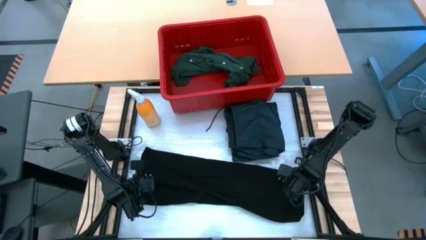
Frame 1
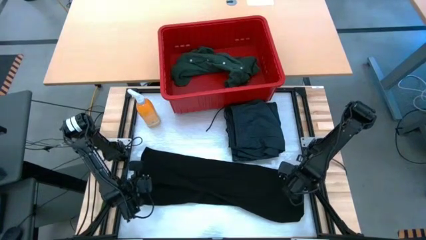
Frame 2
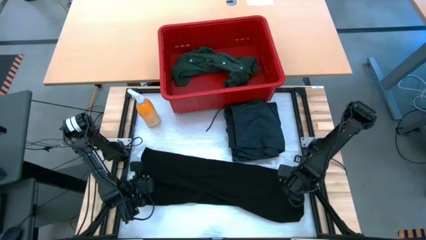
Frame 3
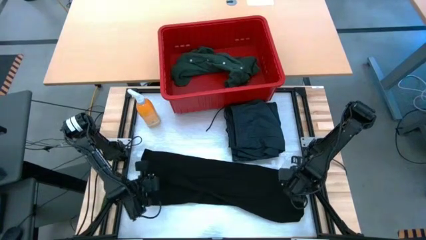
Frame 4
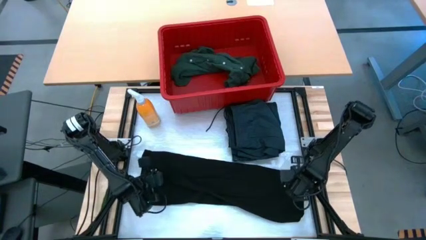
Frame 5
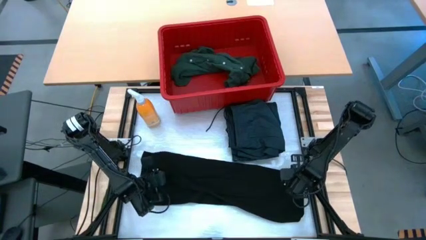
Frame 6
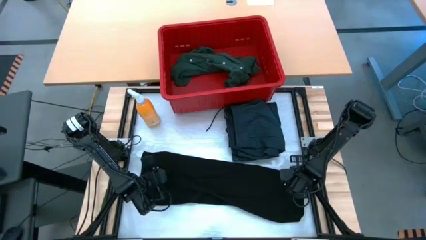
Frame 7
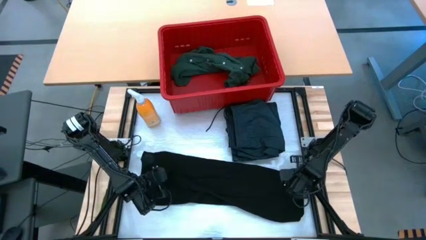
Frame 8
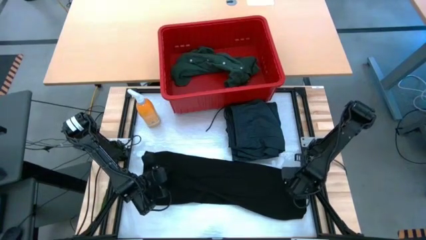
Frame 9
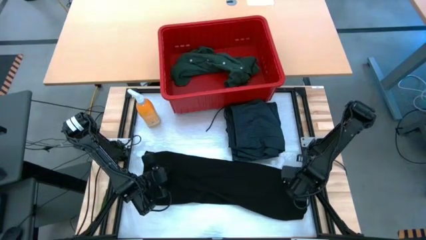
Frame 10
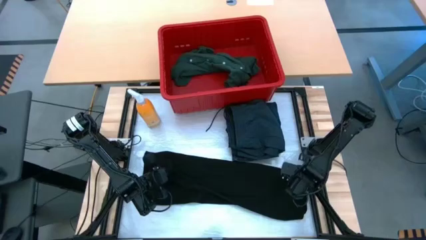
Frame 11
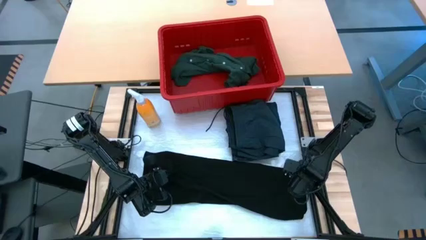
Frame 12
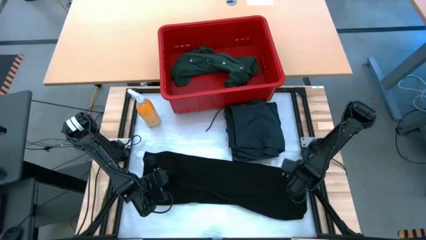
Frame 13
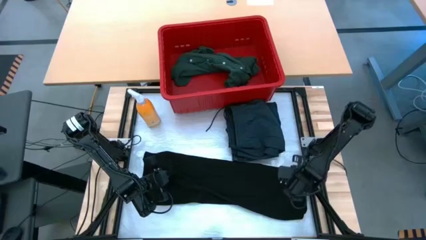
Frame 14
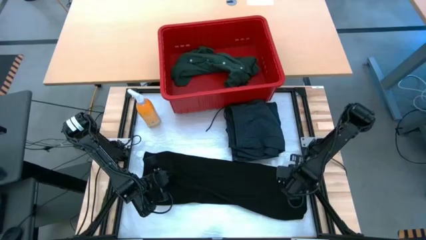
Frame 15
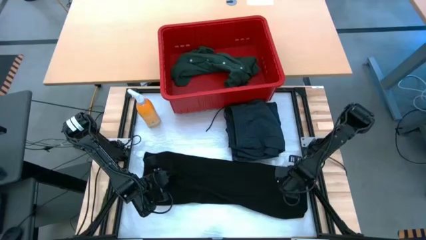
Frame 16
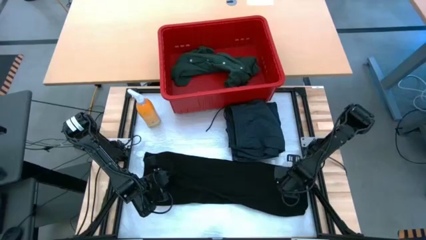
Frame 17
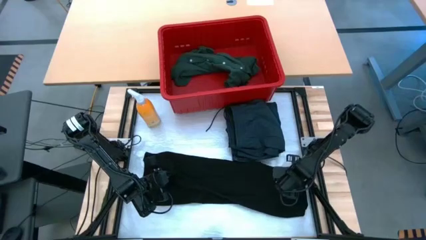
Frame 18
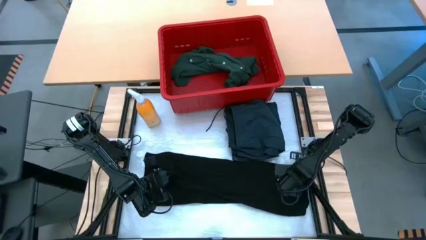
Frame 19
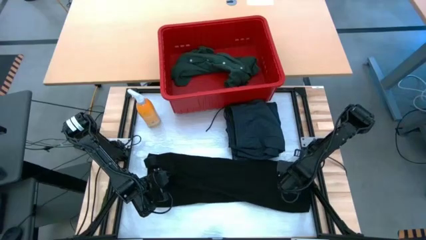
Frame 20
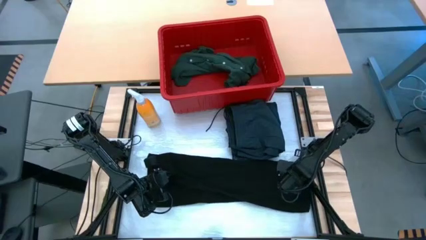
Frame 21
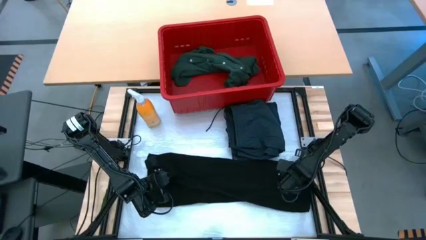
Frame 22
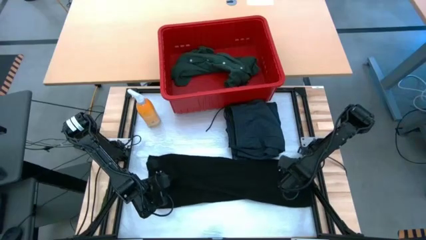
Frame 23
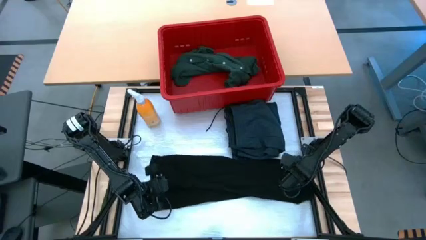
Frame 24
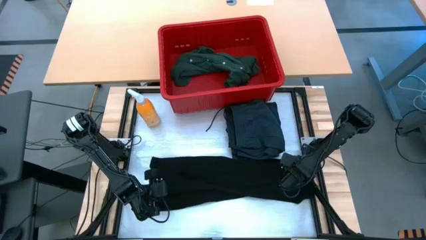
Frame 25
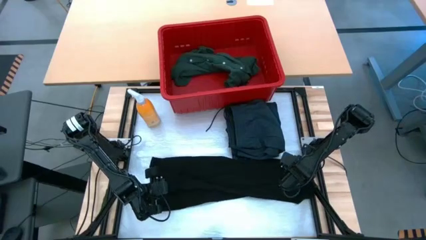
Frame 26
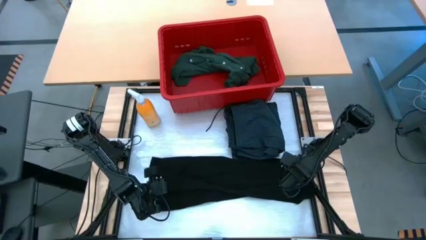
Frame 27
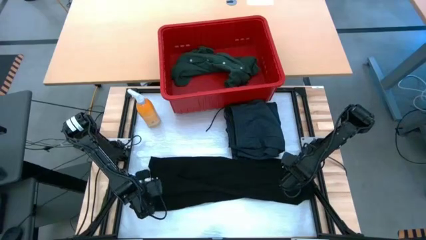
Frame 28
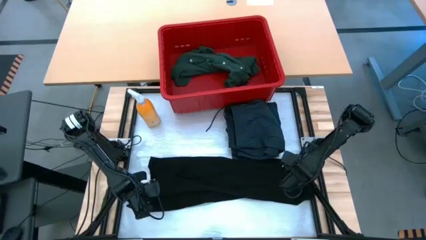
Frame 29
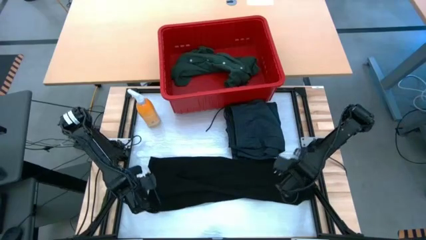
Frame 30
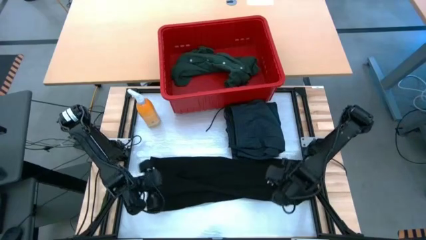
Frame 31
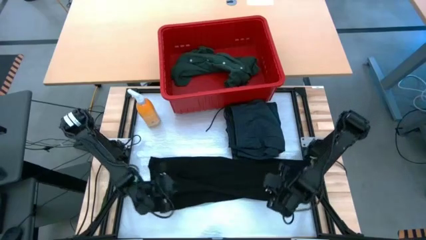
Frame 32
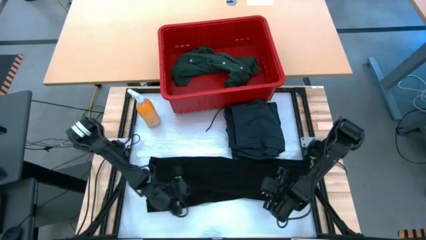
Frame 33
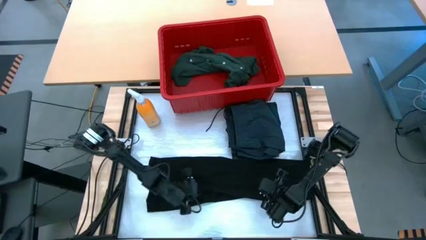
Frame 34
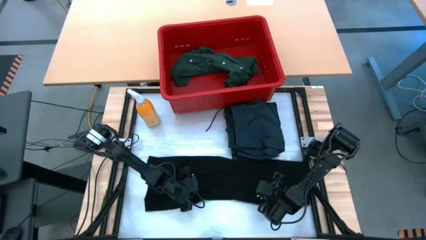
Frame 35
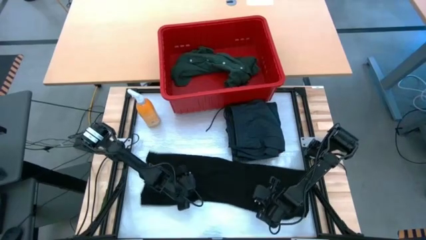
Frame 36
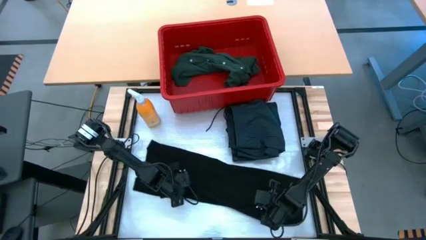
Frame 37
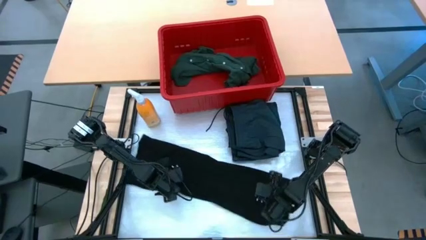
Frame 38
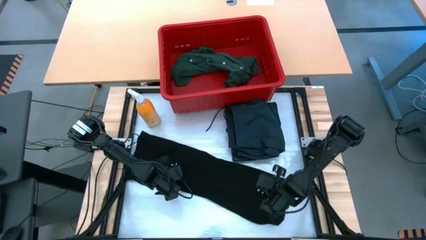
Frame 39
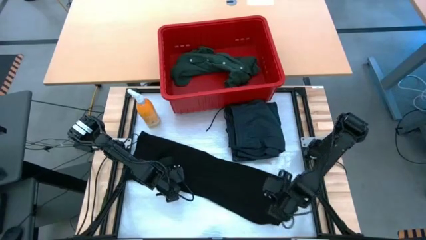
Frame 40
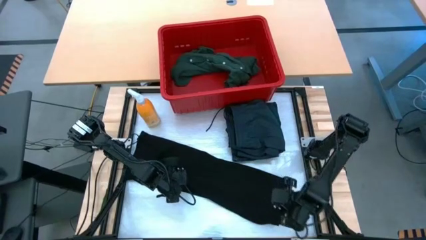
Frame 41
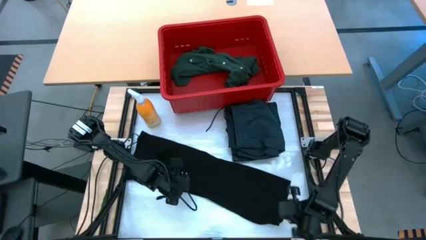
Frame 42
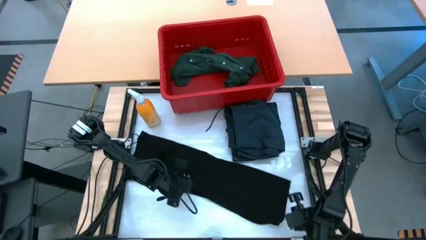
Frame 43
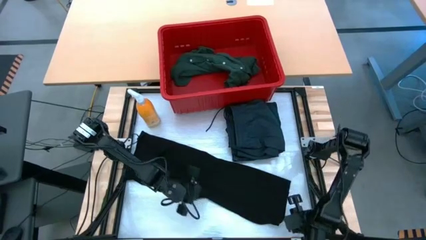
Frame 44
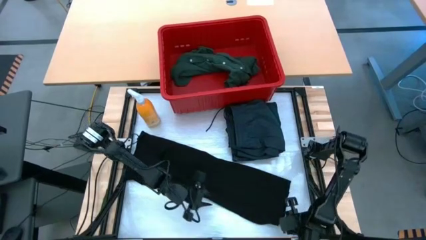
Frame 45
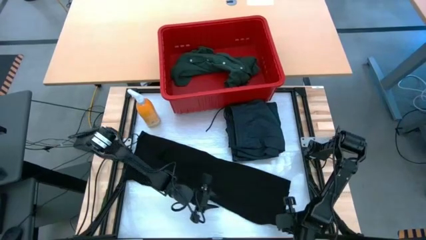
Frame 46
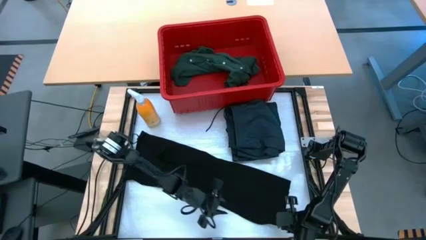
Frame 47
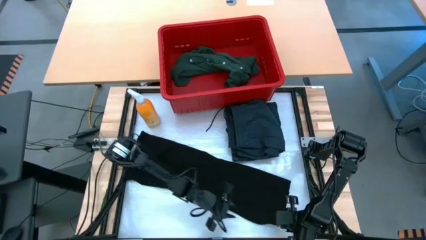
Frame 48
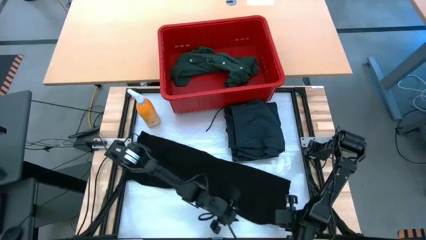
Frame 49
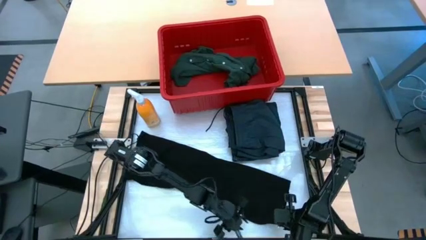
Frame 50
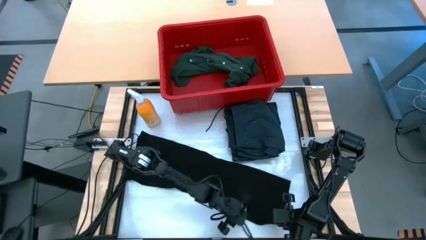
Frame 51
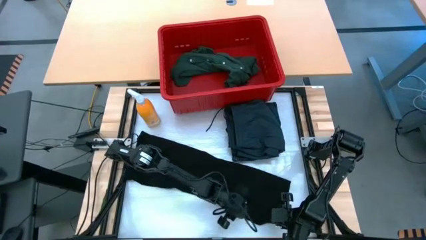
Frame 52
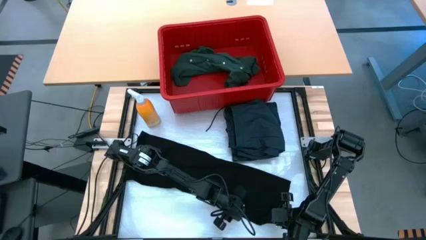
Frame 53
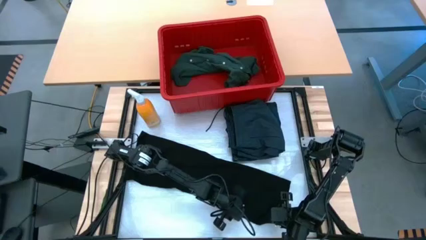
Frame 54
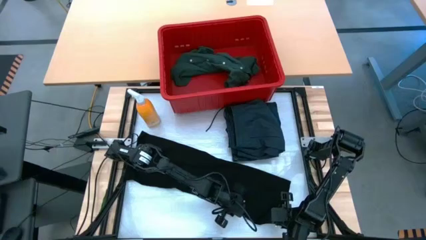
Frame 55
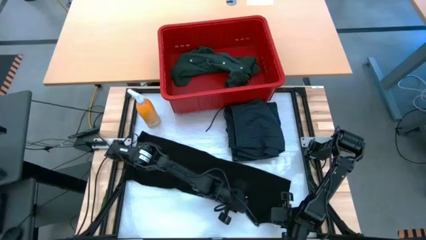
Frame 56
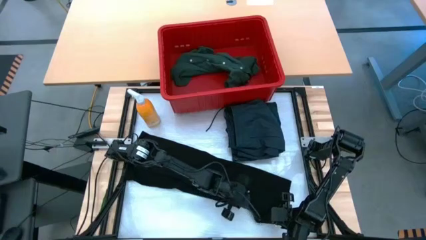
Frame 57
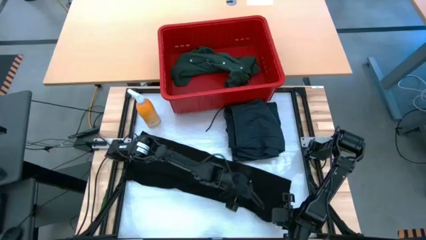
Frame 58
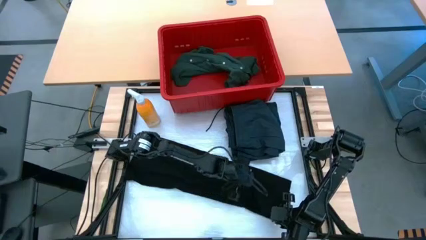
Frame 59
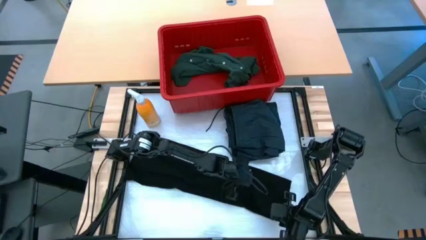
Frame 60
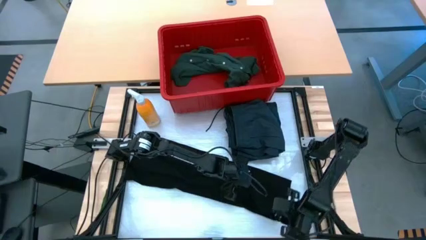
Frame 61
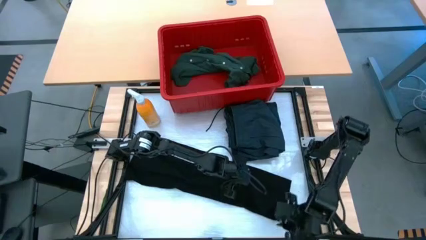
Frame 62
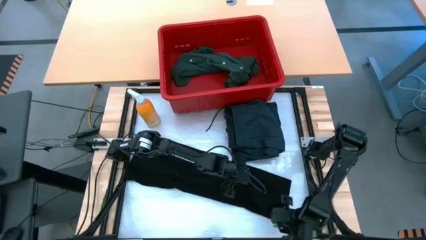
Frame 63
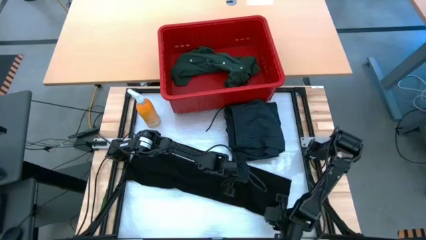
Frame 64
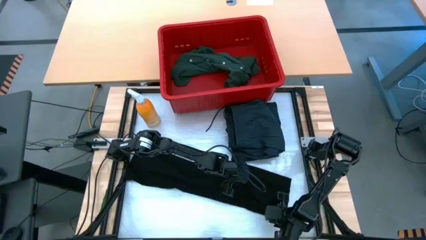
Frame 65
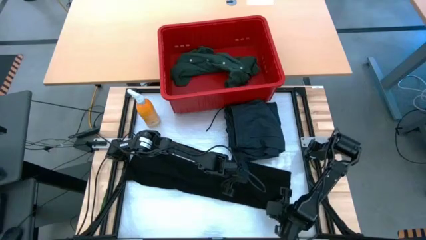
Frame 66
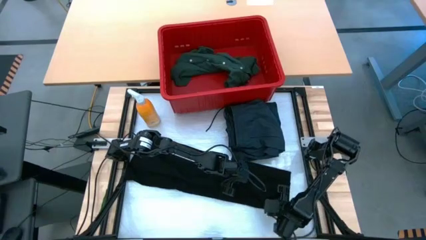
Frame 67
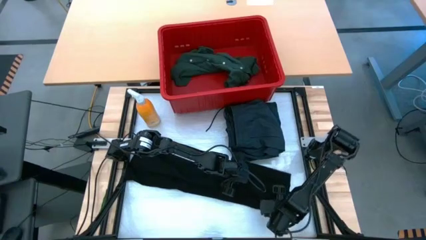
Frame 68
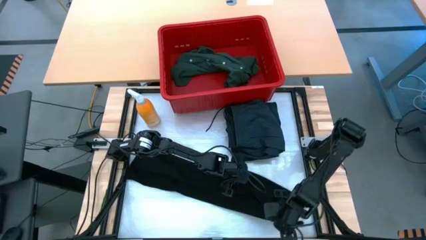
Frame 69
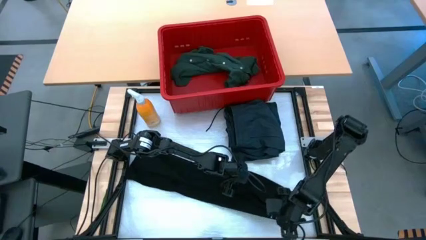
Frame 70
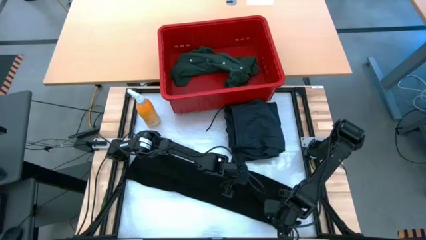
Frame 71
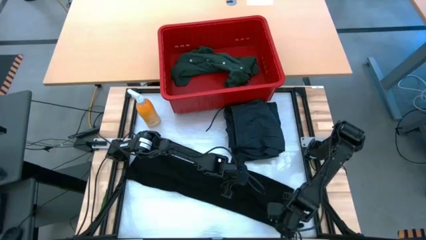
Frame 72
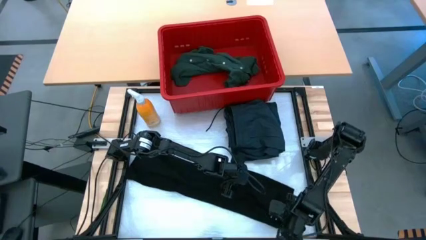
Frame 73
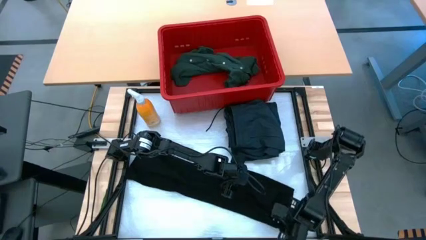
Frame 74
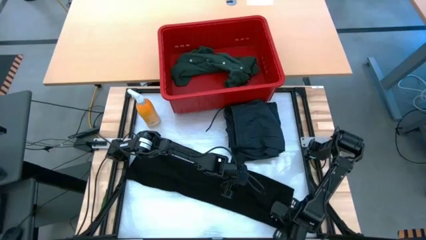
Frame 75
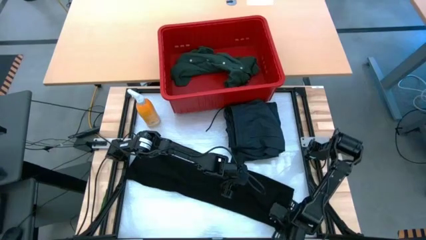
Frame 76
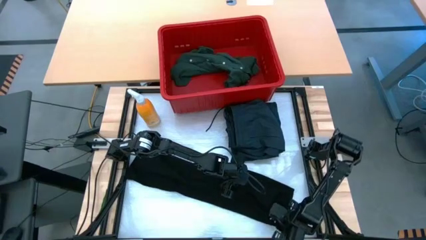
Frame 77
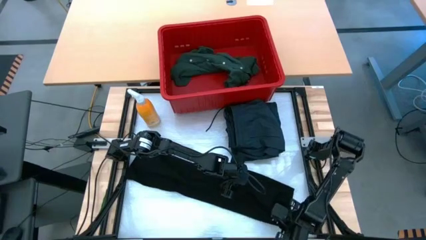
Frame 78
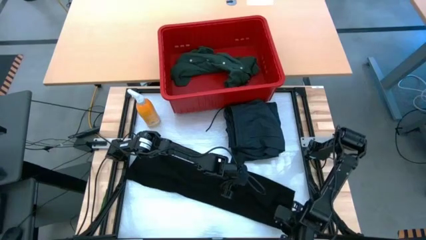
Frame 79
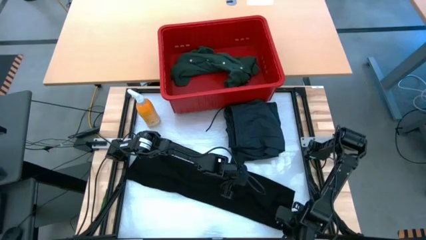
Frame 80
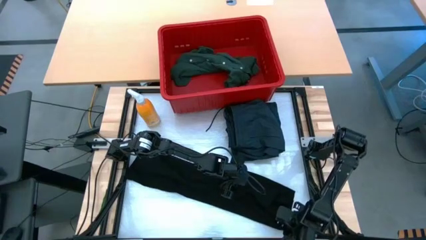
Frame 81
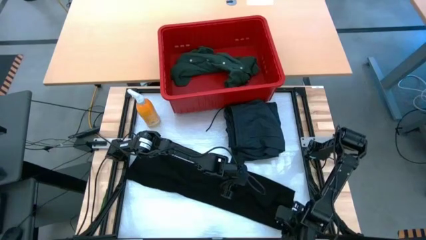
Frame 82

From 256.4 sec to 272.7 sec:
Task: Fold Laundry from Bin
Fold the black shirt
